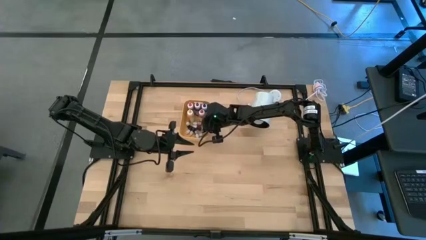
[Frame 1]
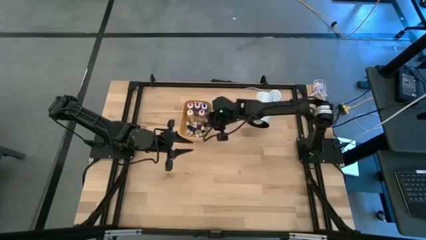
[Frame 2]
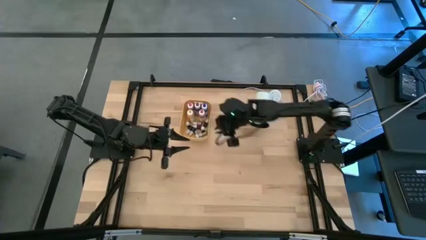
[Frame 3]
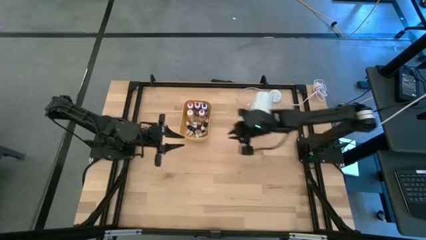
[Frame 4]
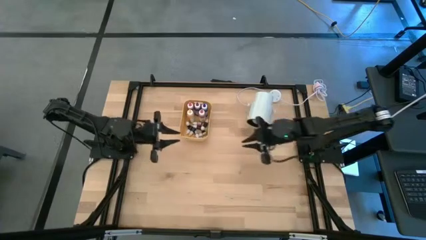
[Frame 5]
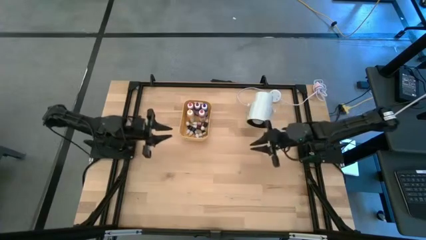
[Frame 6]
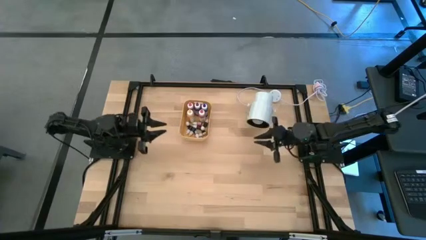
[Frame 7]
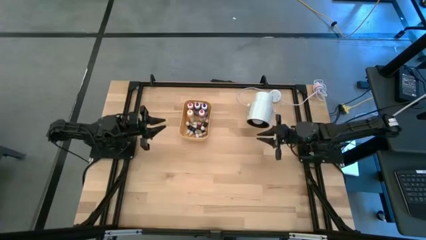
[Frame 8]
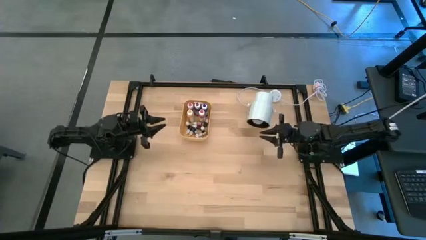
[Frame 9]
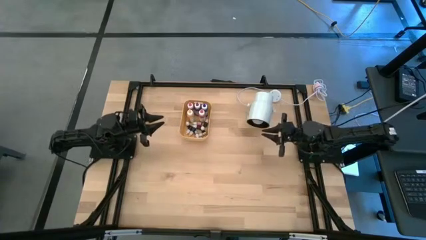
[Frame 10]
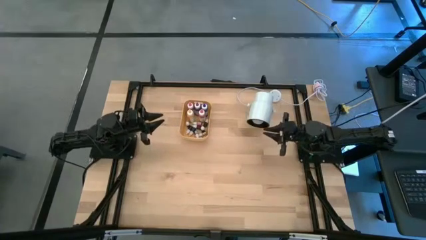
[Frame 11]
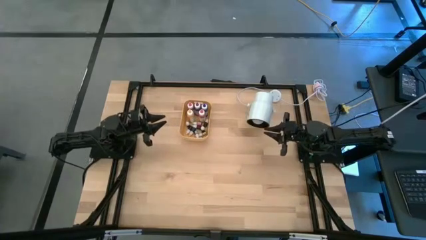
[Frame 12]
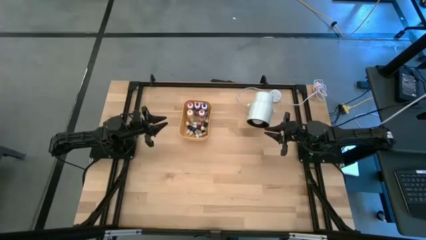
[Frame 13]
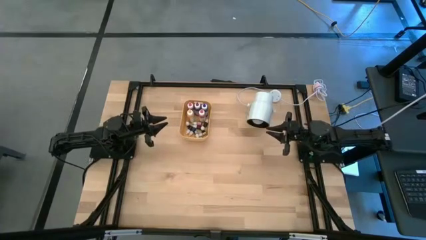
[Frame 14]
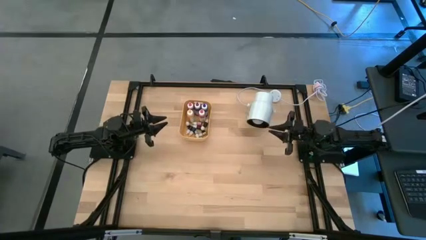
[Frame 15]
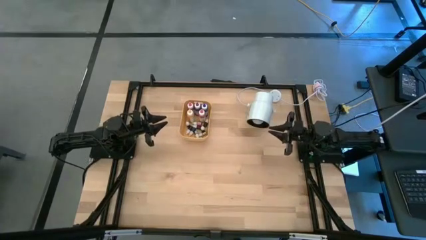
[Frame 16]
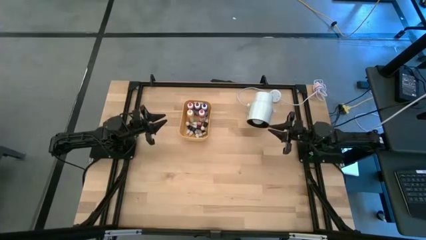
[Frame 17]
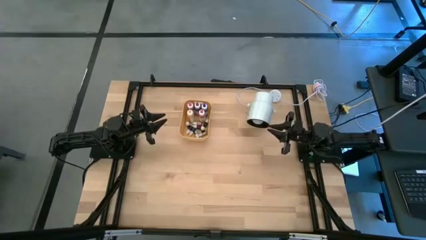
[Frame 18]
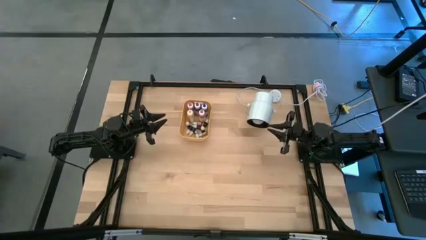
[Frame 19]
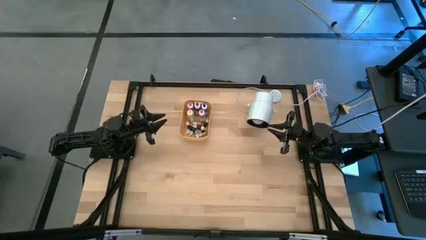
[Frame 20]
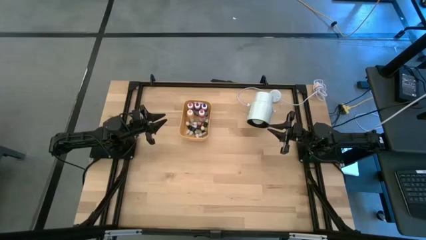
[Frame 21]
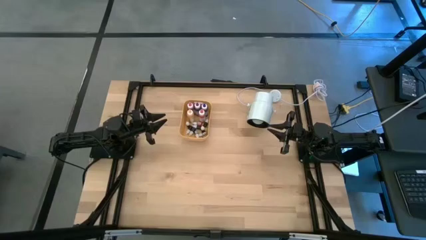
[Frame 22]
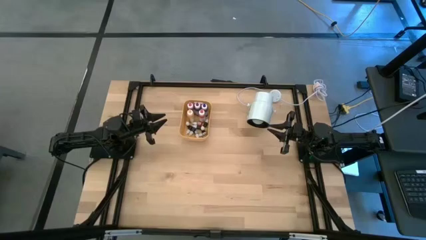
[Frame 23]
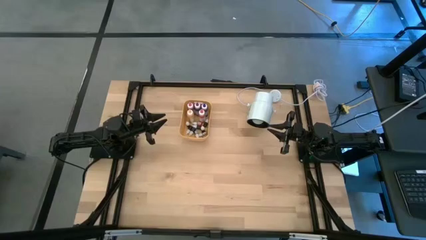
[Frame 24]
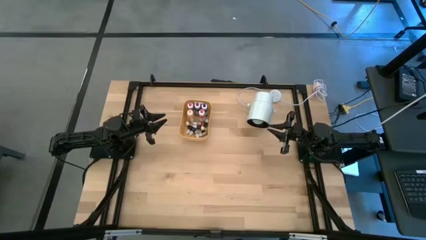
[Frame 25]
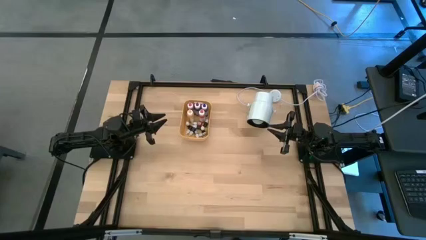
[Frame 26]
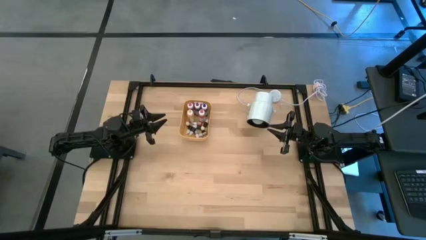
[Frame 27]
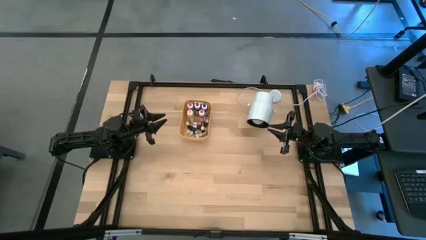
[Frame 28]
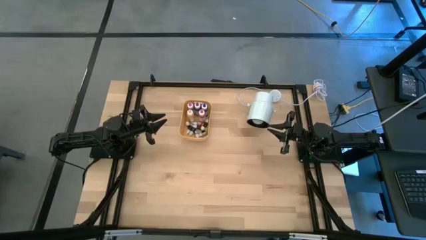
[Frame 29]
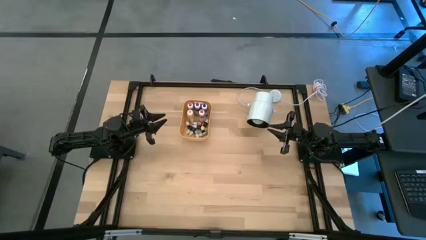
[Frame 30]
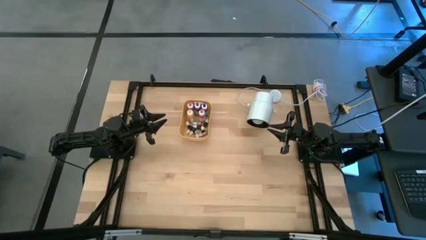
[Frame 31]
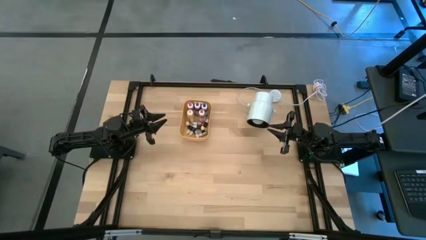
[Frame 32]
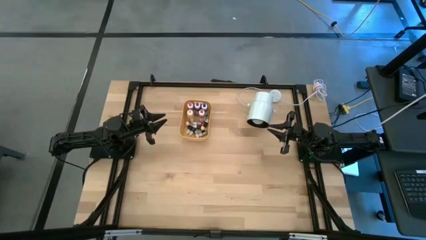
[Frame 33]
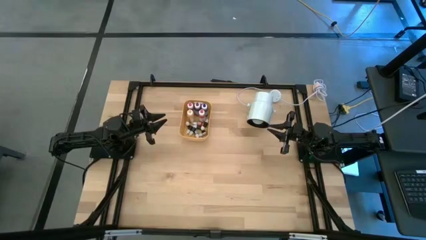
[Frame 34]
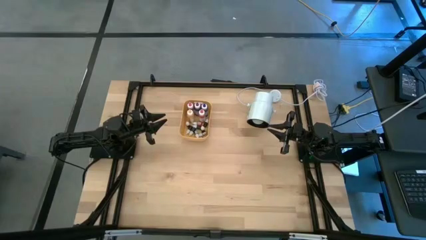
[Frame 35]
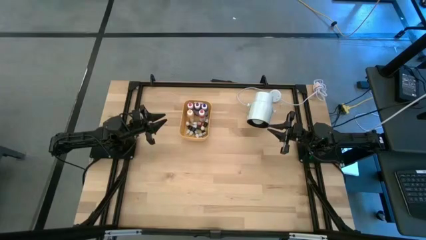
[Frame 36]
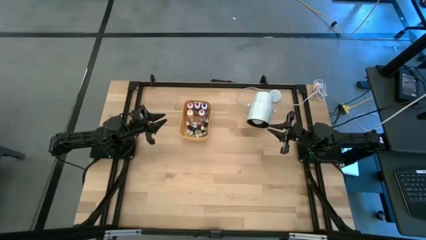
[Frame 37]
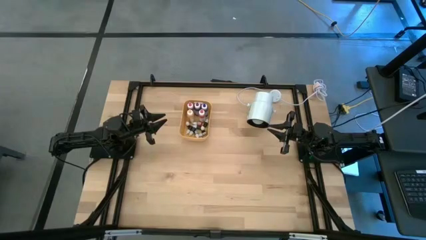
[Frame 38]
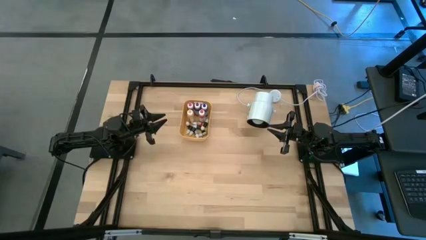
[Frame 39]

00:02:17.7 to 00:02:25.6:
Task: Pick & Place food coloring
Return to Home Position

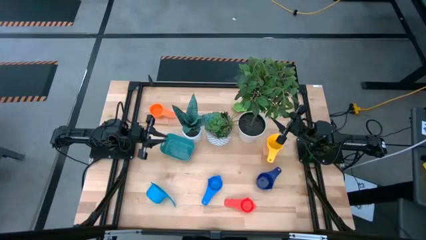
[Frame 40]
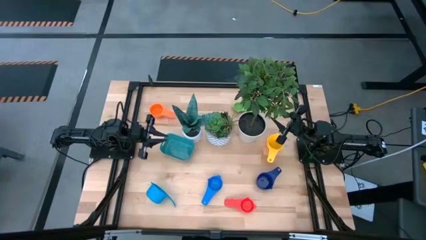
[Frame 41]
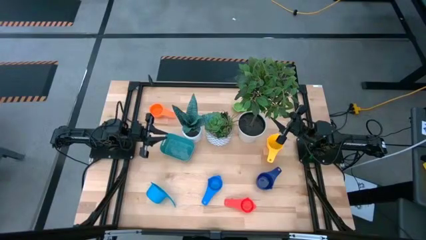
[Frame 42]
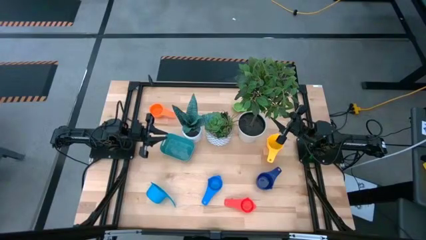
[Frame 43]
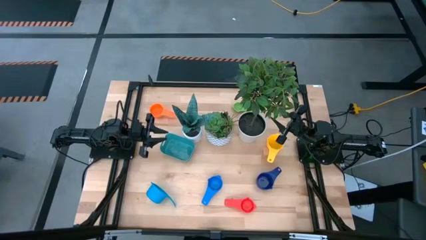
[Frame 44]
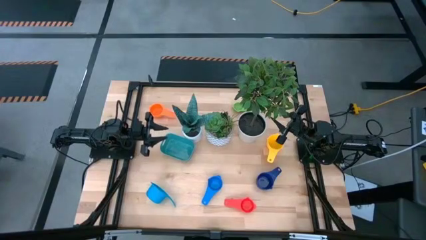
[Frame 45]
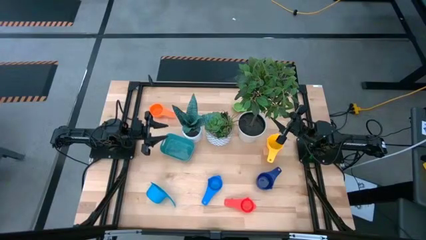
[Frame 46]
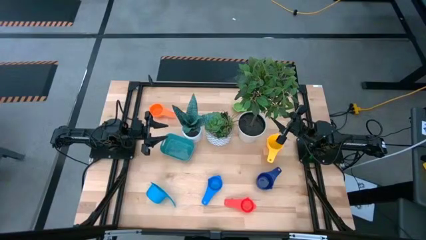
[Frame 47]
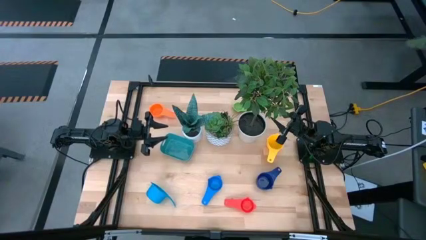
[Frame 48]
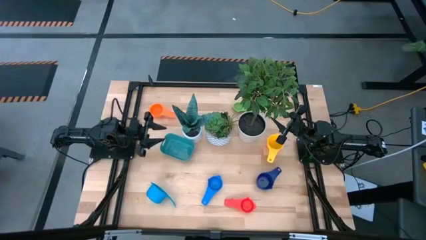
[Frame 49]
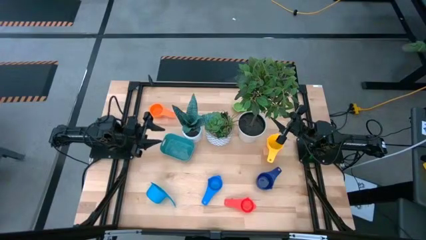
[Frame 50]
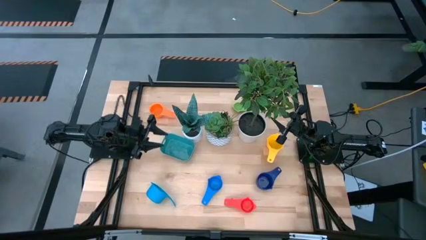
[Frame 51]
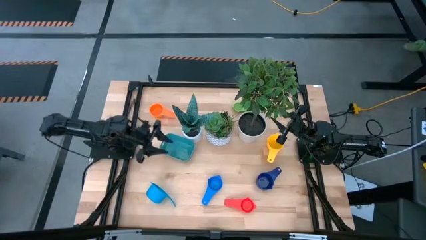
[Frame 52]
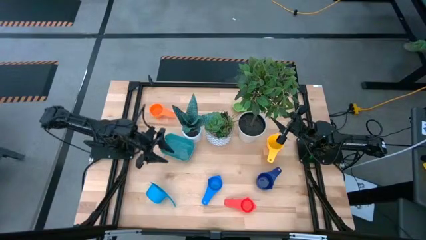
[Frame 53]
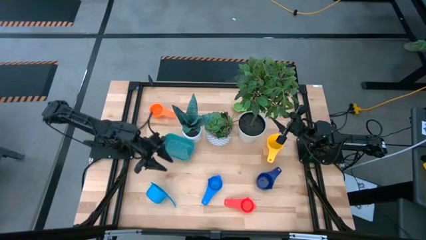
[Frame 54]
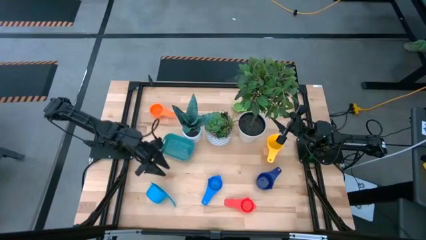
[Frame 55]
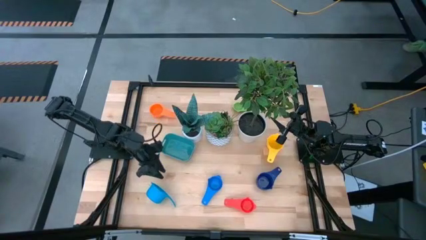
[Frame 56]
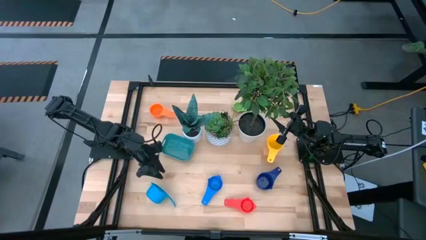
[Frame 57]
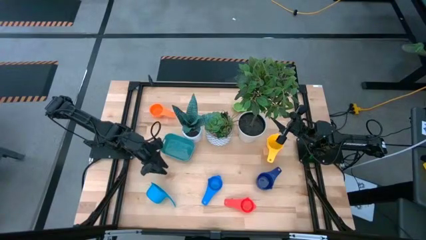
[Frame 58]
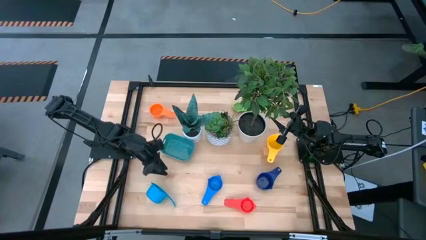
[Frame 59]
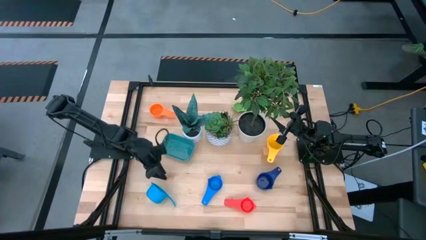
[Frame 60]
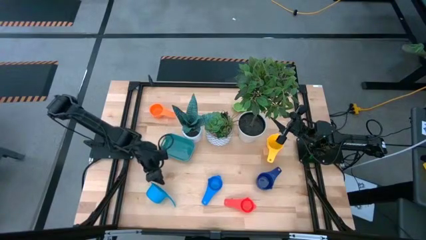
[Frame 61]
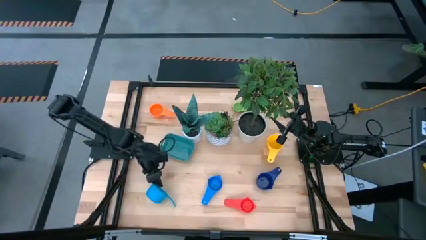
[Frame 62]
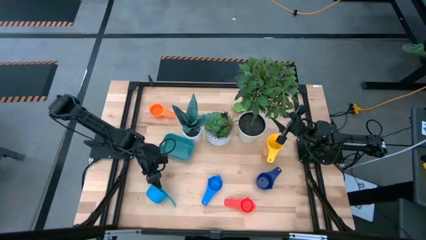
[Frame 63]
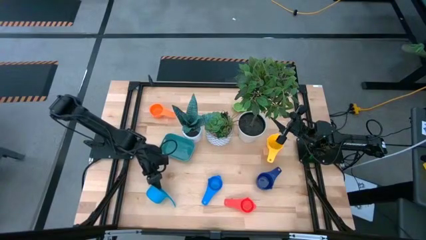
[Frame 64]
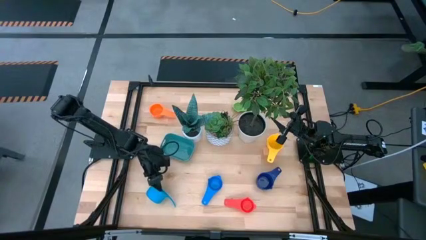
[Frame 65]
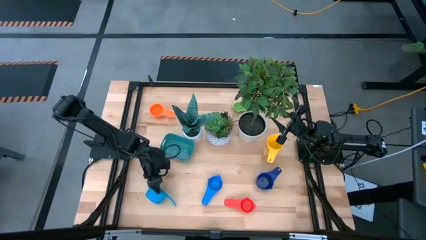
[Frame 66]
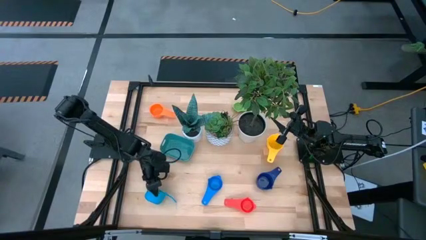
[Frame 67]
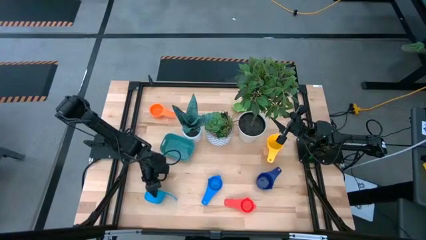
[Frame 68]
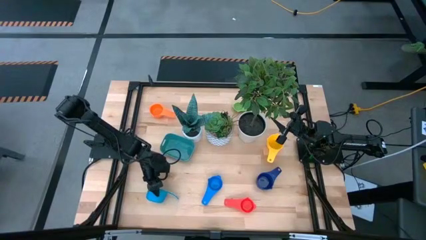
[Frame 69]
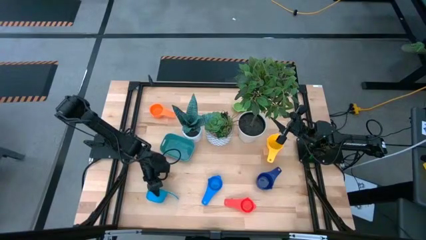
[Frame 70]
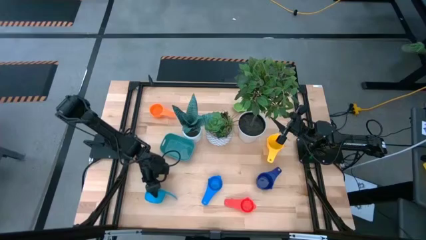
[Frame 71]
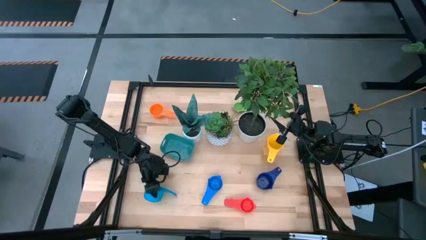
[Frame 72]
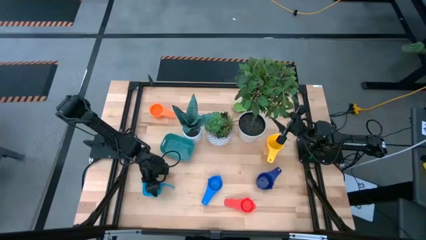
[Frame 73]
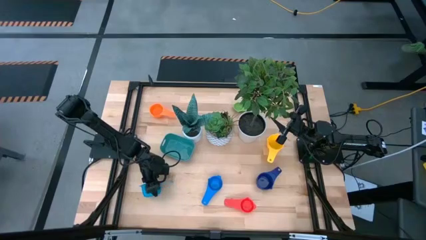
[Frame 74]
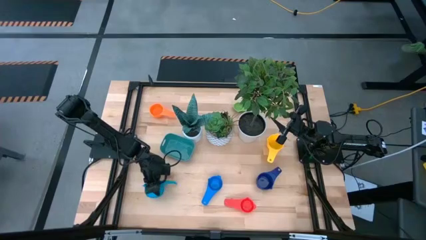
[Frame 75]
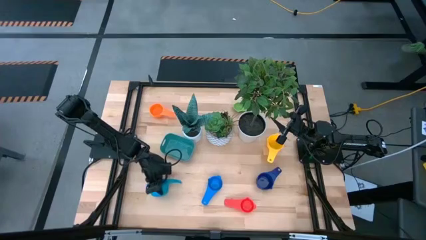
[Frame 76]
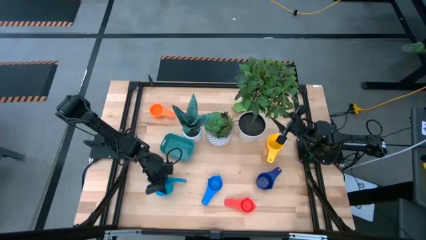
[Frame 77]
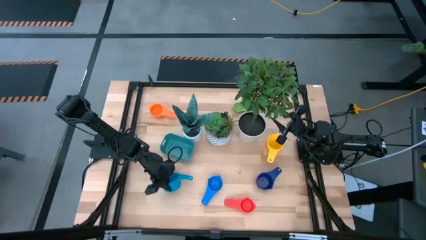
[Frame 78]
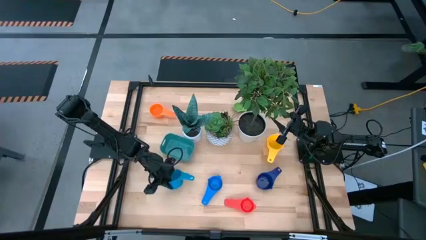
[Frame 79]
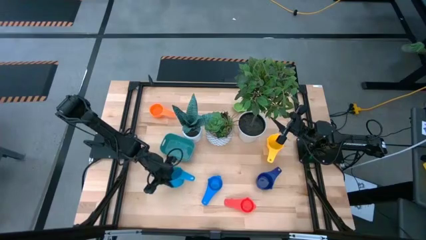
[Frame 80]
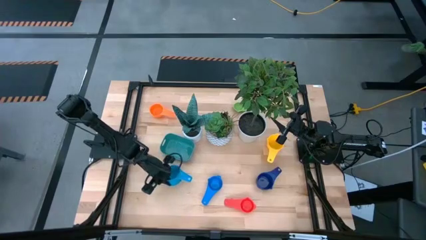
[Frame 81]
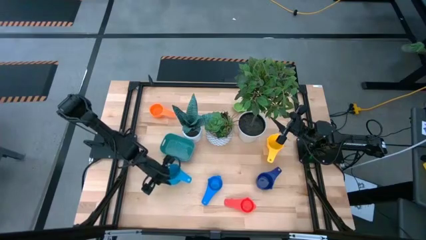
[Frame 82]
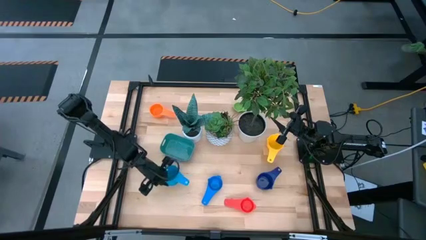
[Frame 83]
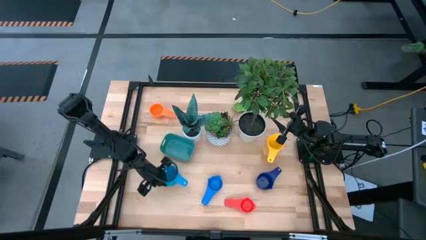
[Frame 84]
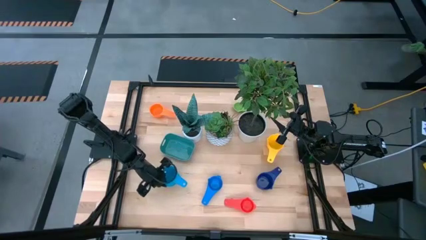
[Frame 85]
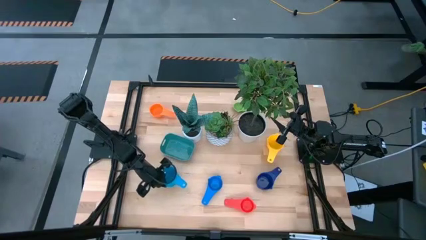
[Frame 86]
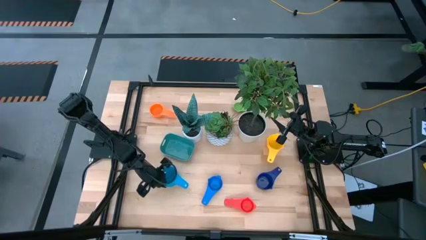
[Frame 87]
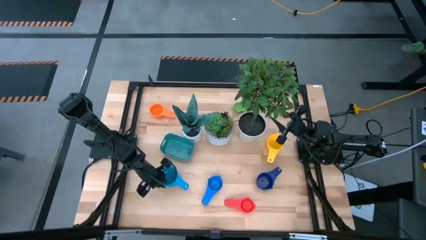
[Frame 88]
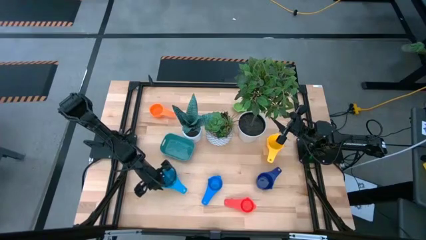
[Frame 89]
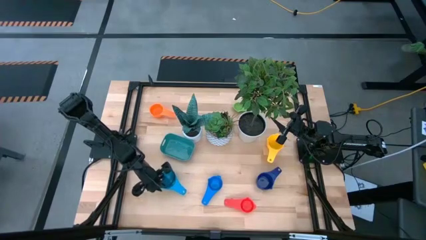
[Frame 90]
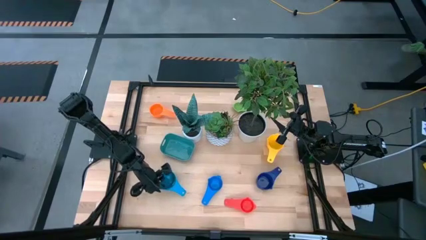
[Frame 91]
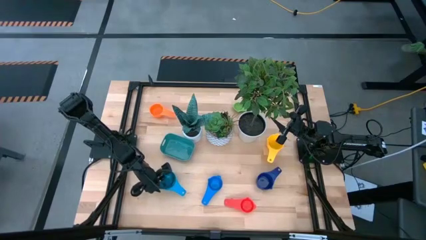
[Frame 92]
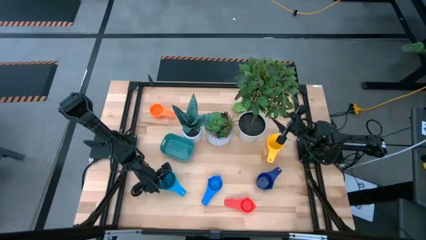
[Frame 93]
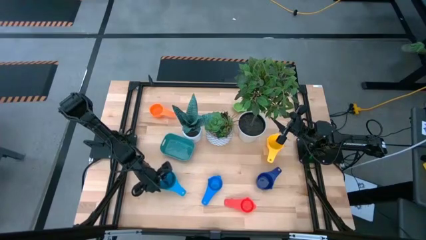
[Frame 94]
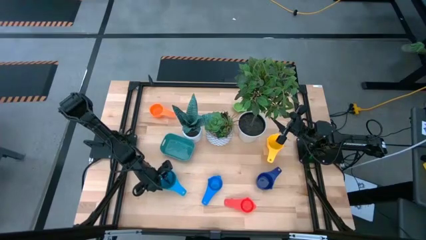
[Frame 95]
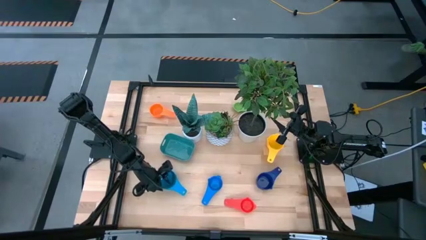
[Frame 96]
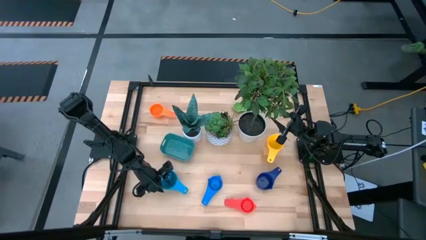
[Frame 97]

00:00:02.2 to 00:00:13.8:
Task: Nest measuring cups in basket
Adjust the light blue measuring cup
